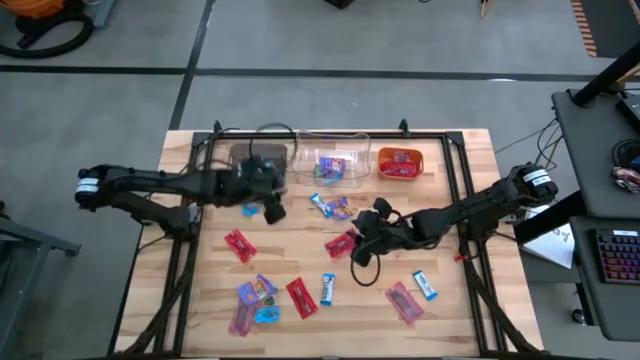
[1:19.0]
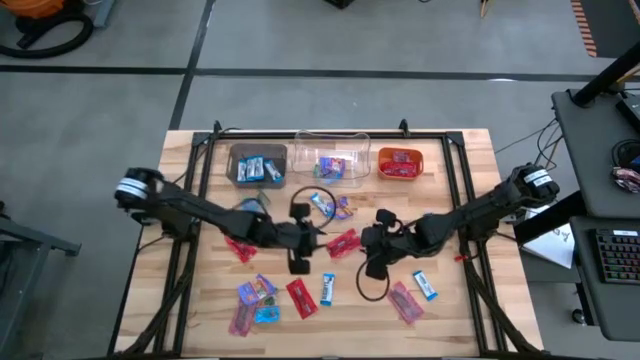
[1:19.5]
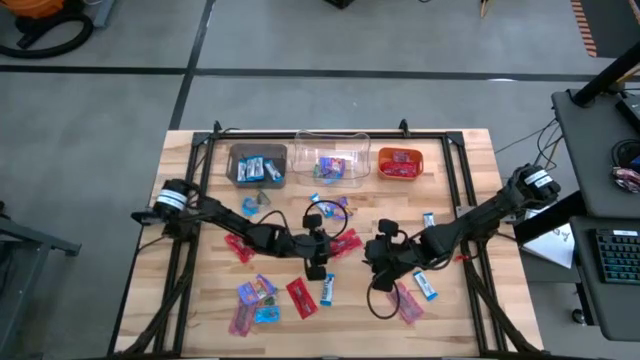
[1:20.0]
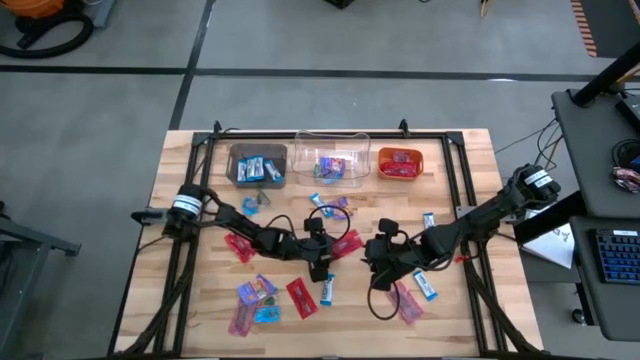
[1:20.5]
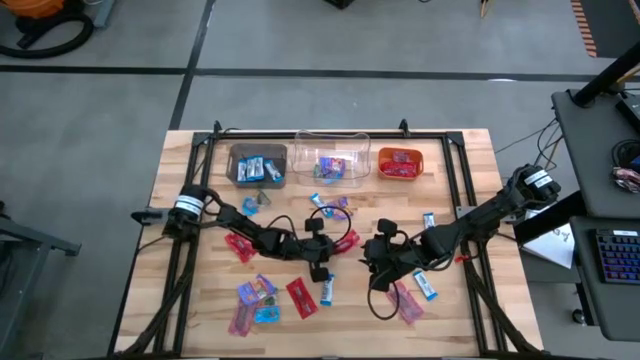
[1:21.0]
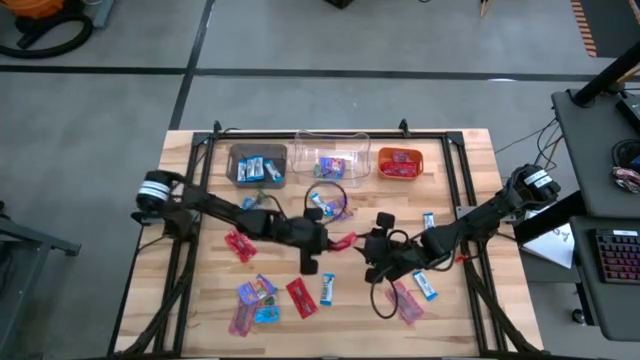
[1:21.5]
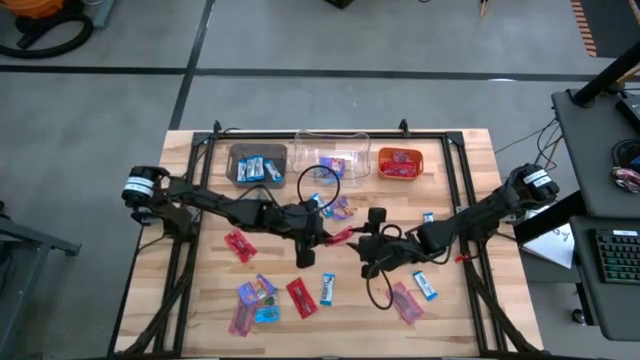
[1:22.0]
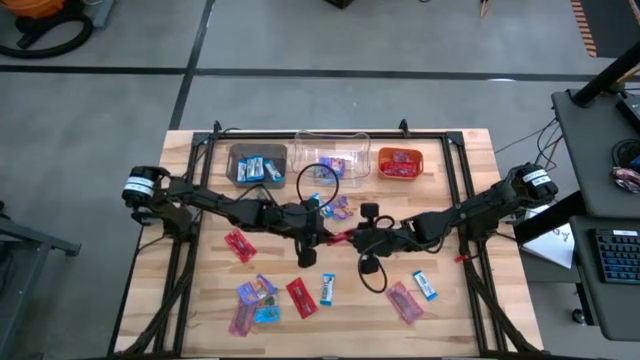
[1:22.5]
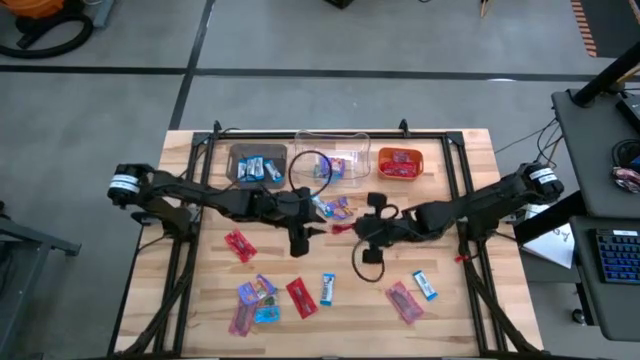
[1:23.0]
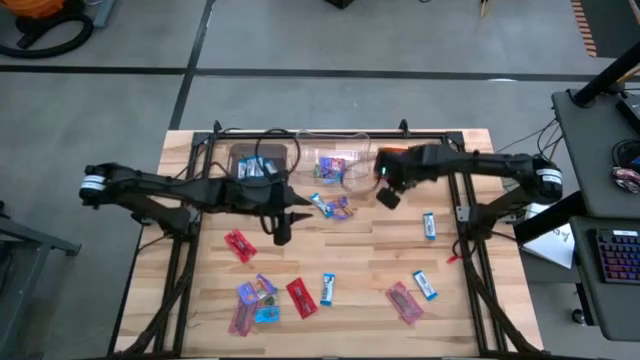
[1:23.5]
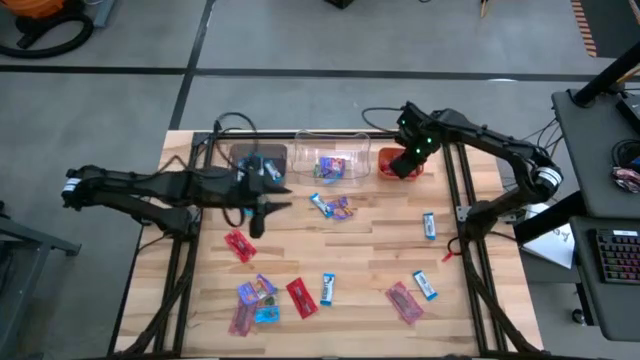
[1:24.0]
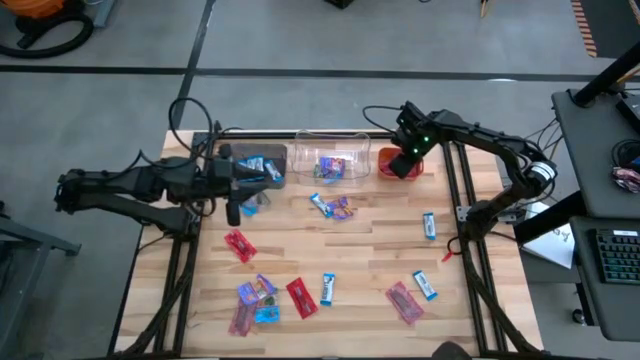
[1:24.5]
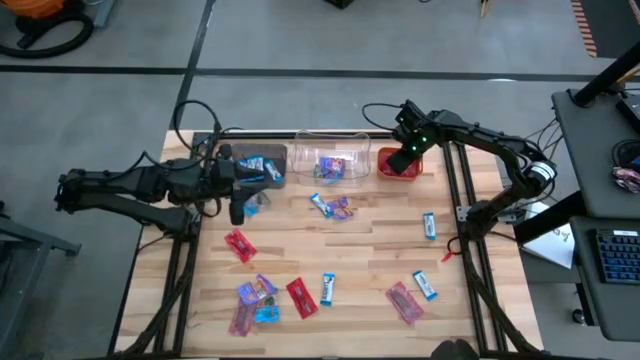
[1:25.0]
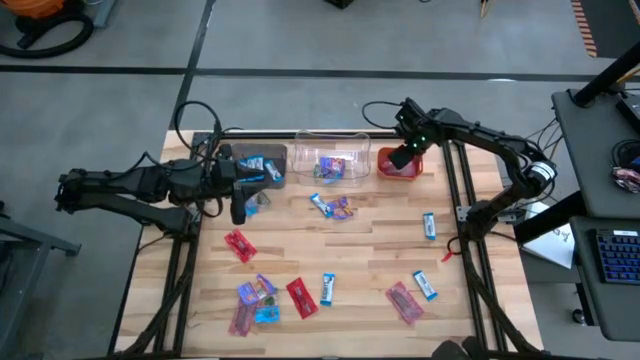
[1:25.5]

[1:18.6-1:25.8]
Task: Sort candy
Put the red candy into the orange bin

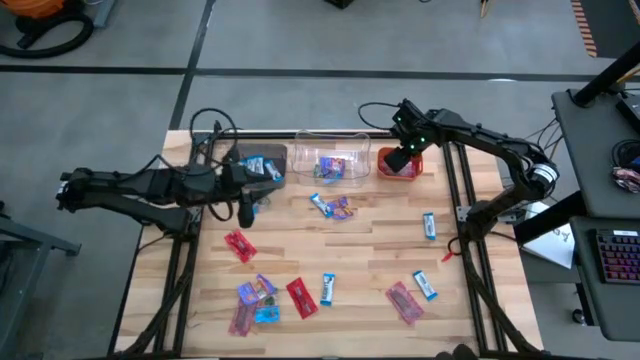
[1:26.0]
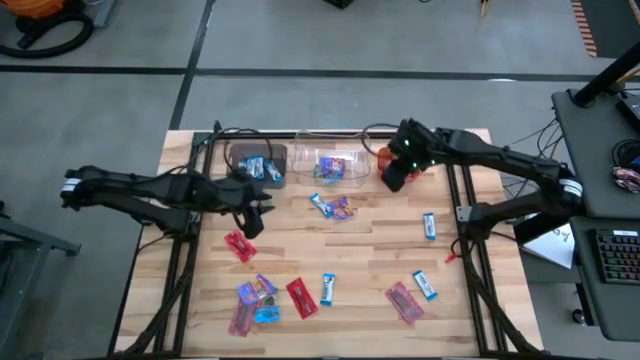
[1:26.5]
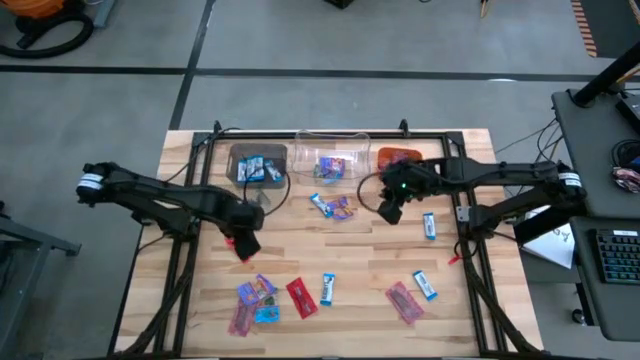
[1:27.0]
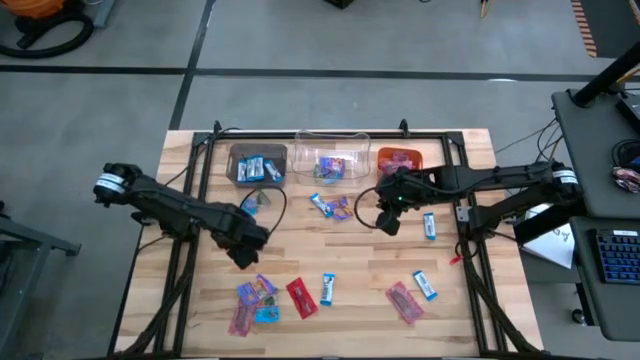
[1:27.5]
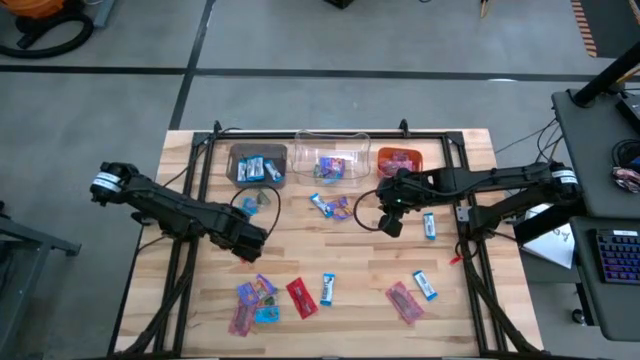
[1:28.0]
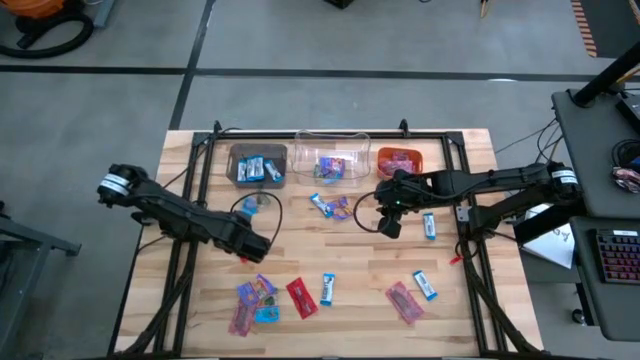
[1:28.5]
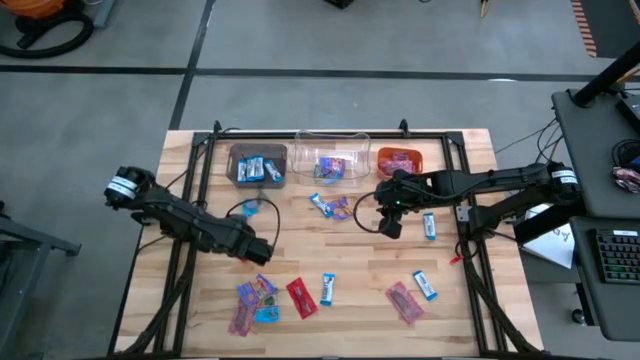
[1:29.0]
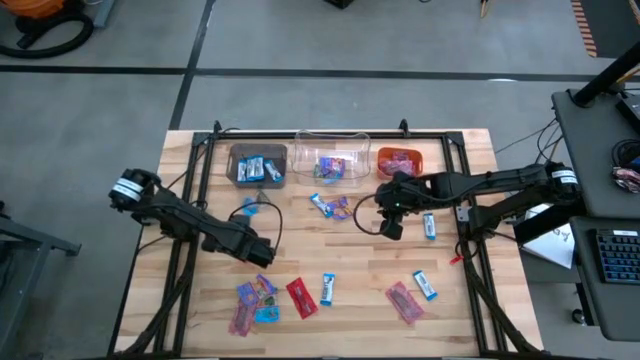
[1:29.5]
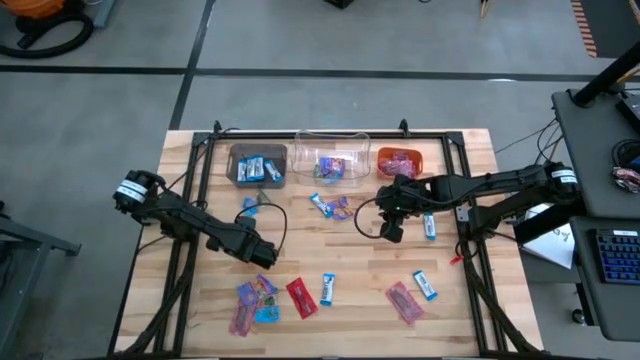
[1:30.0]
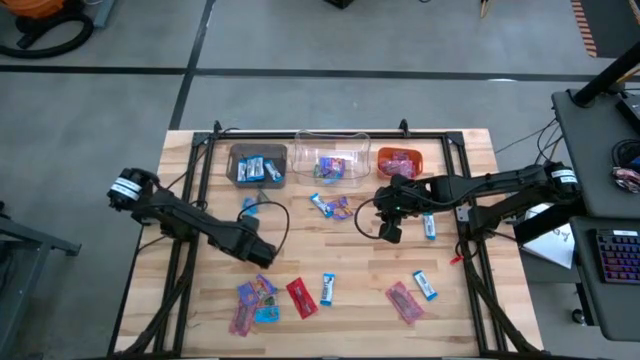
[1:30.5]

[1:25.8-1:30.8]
Put the red candy into the orange bin

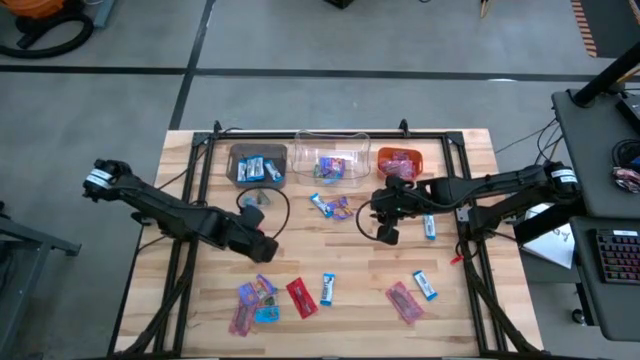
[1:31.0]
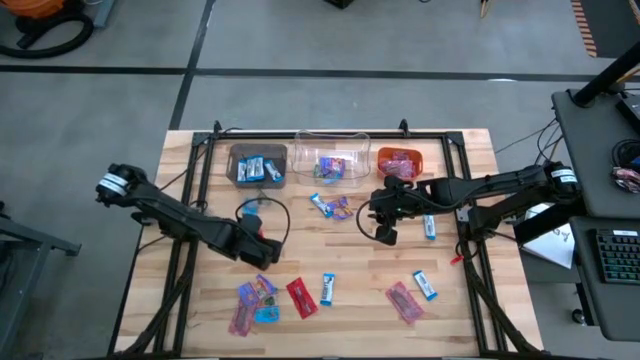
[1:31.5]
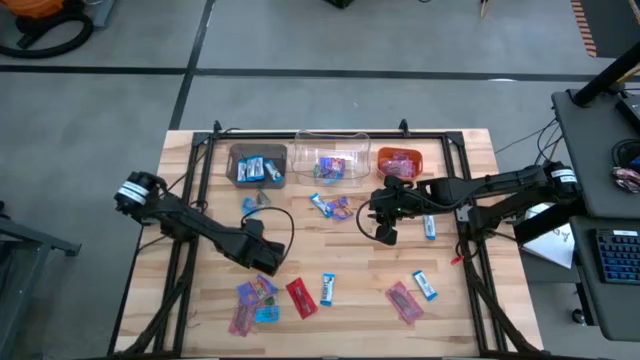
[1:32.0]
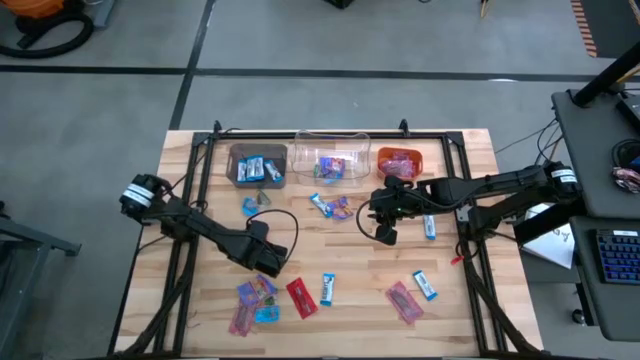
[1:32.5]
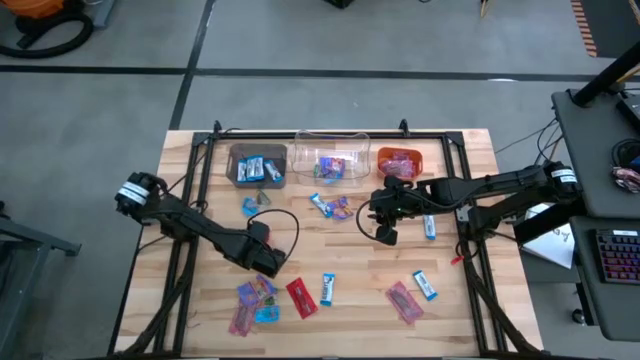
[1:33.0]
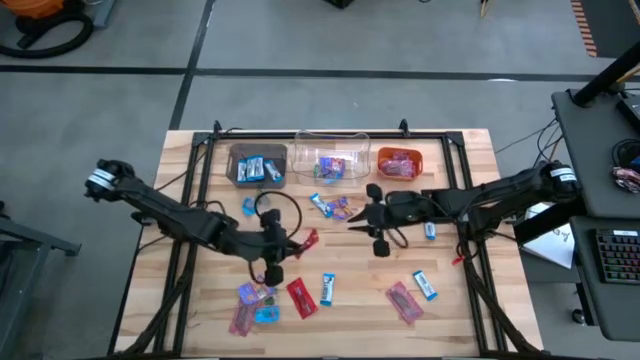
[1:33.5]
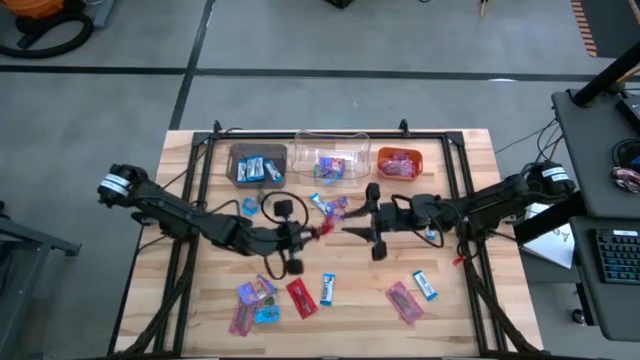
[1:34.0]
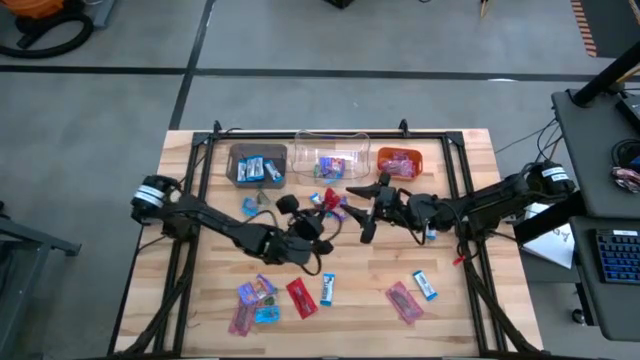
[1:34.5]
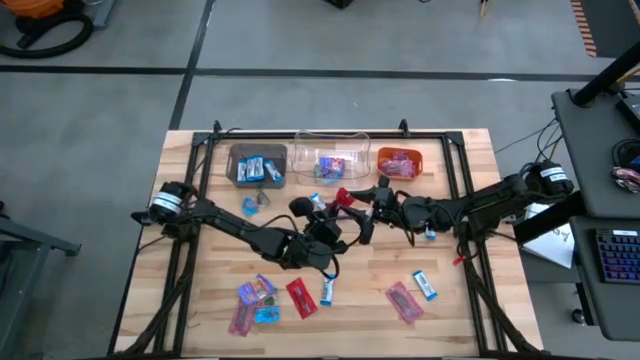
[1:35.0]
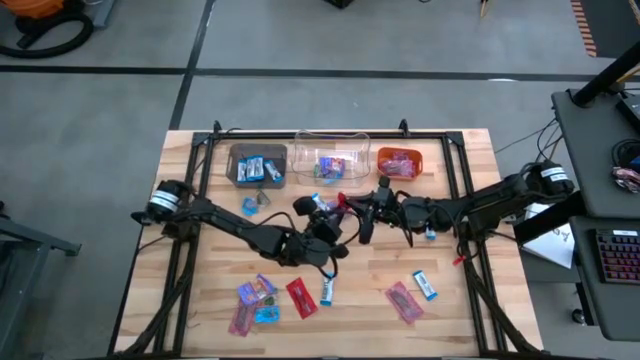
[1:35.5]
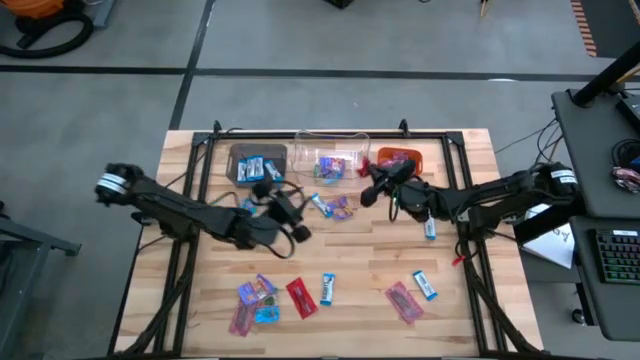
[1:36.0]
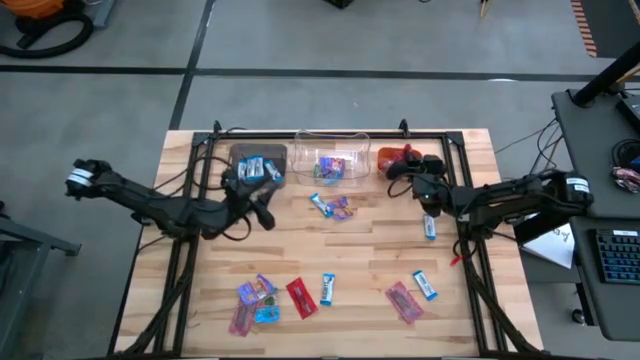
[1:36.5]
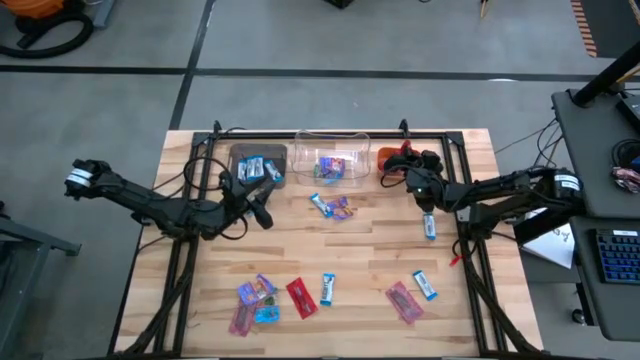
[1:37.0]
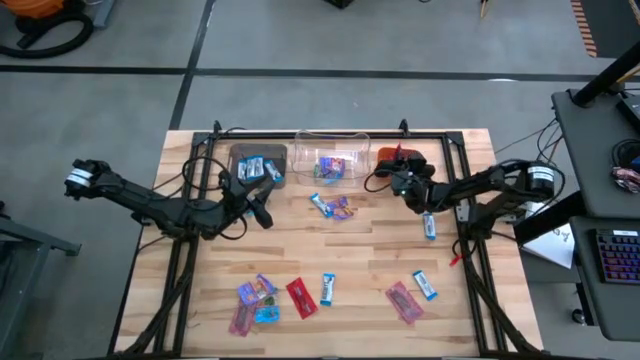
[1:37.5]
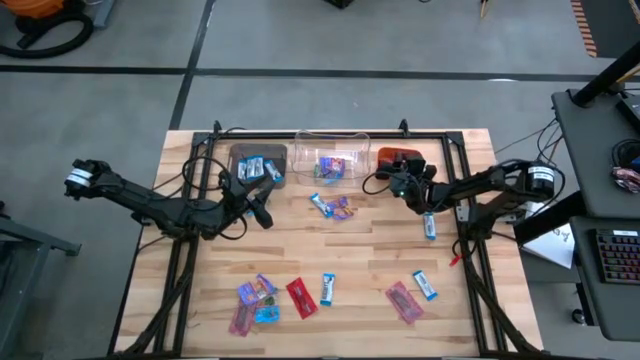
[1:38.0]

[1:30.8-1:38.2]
Put the red candy into the orange bin
